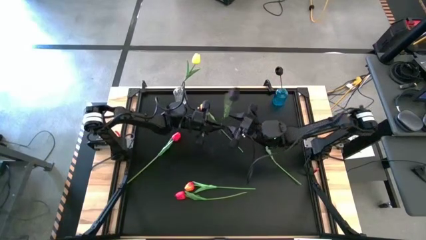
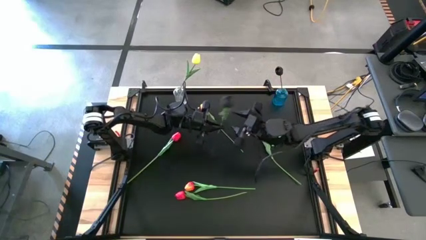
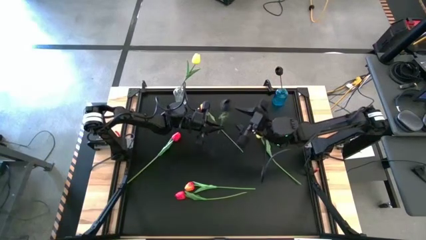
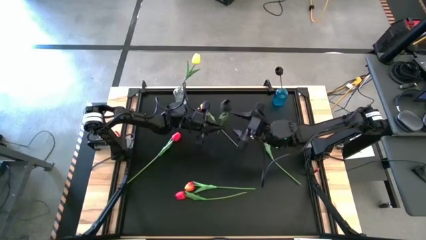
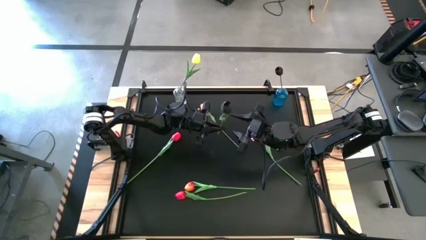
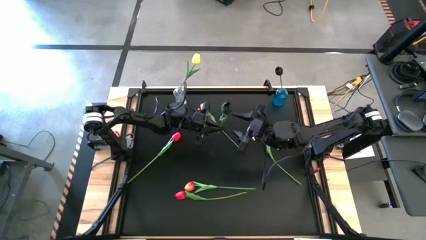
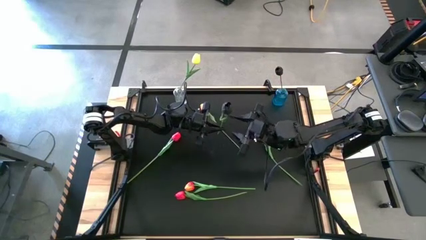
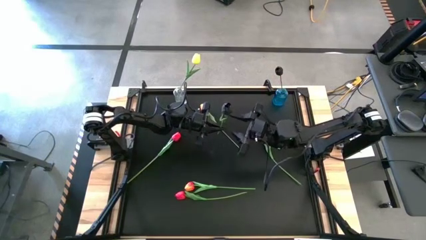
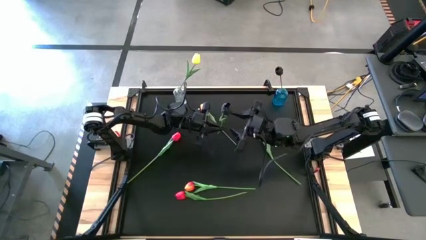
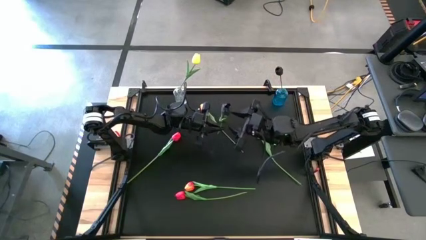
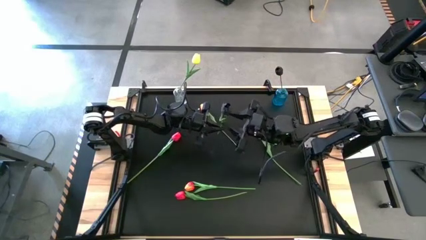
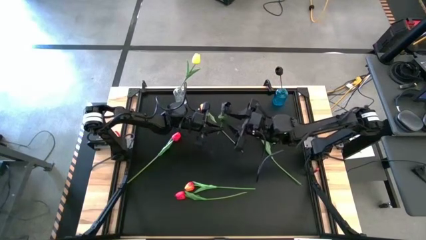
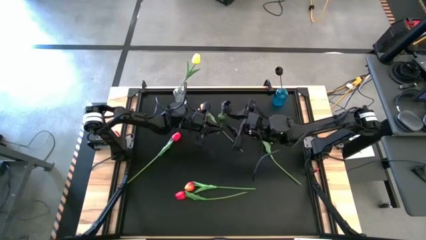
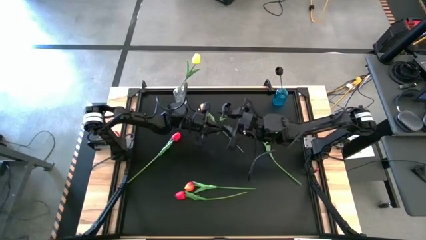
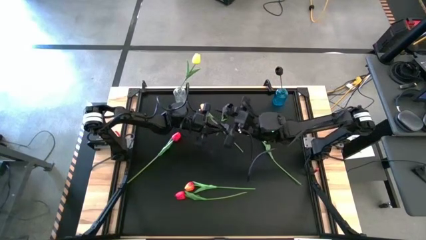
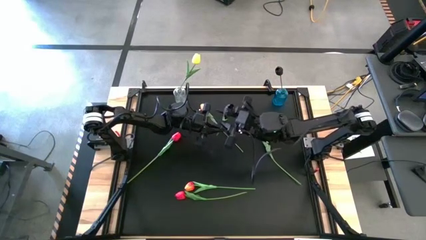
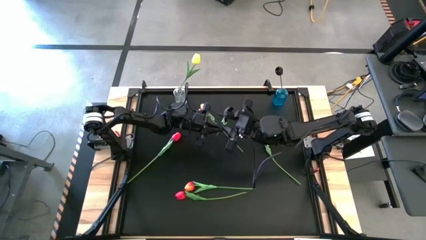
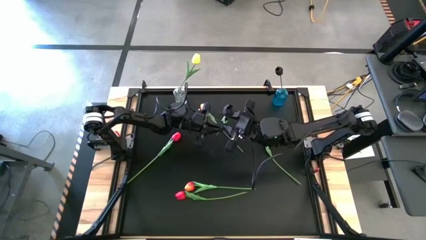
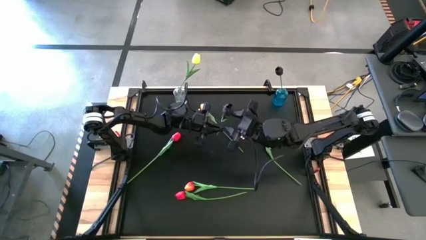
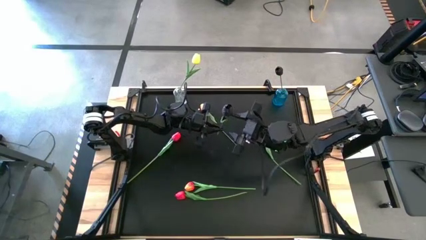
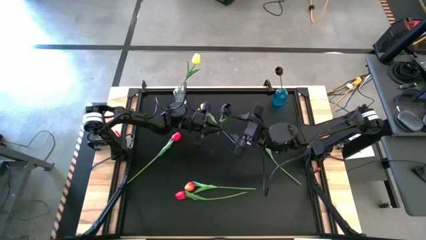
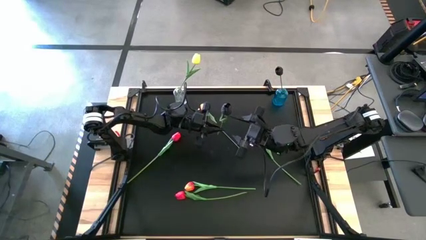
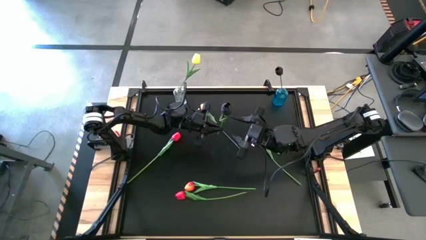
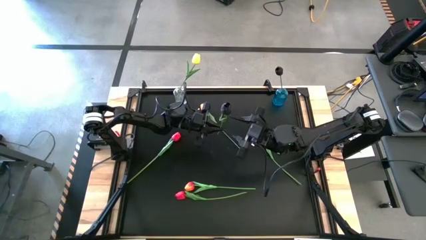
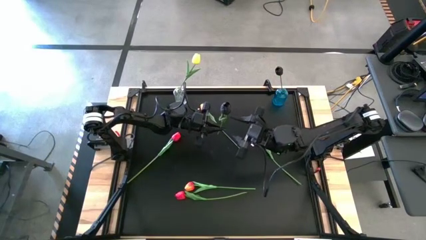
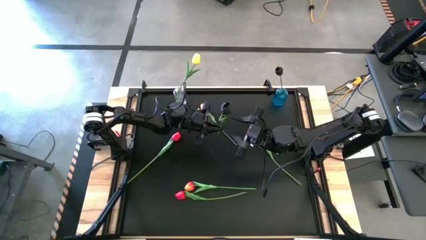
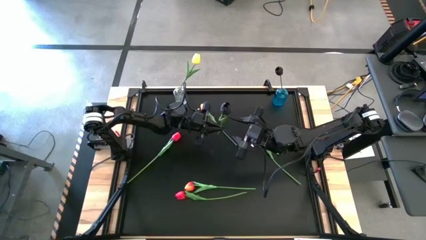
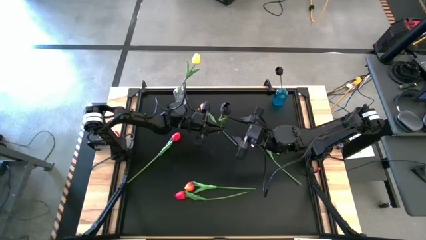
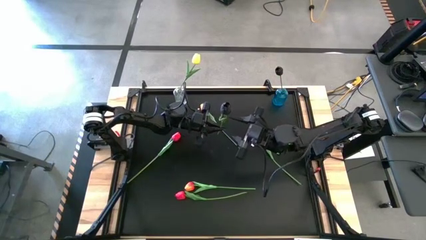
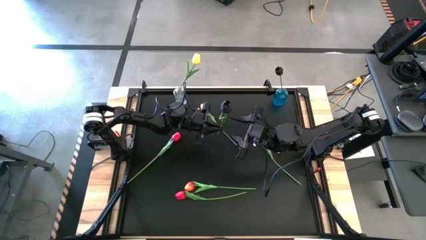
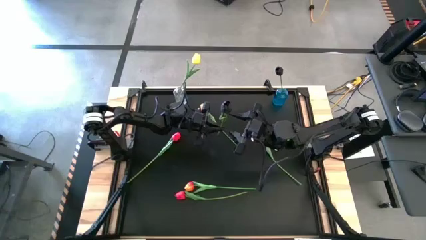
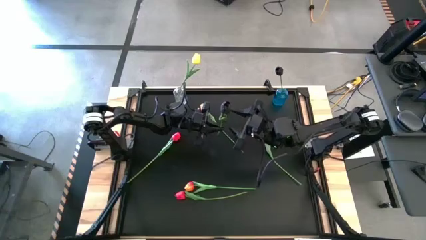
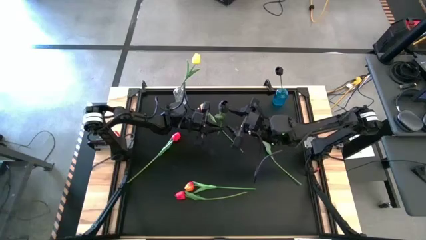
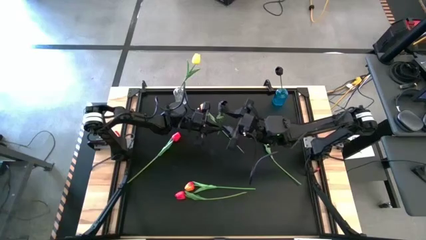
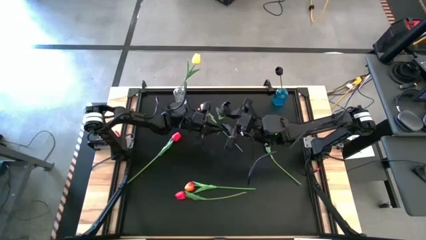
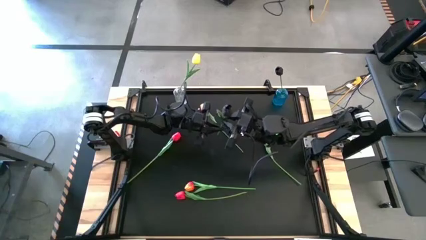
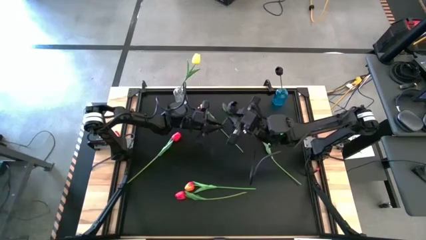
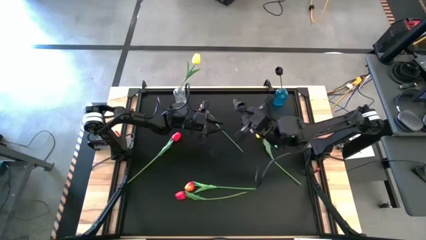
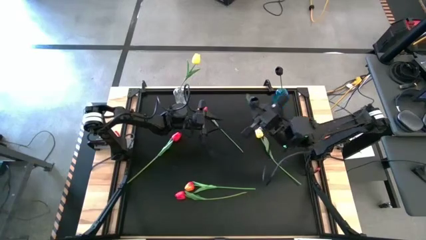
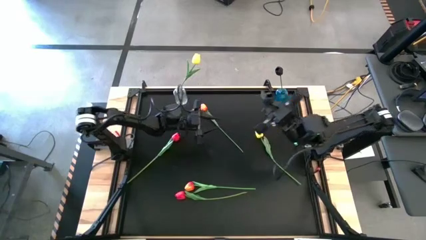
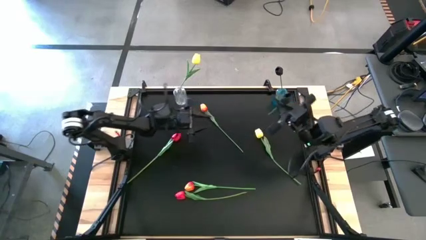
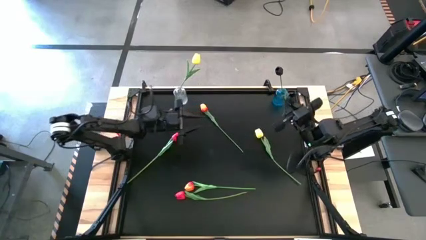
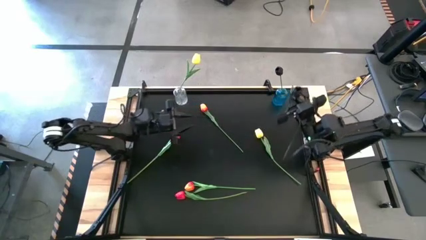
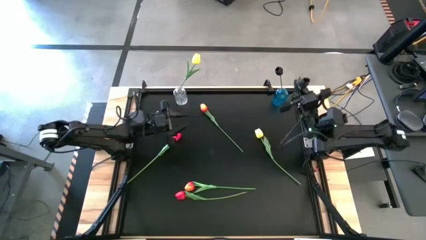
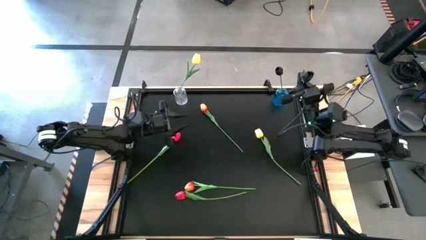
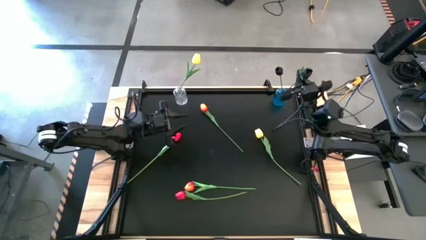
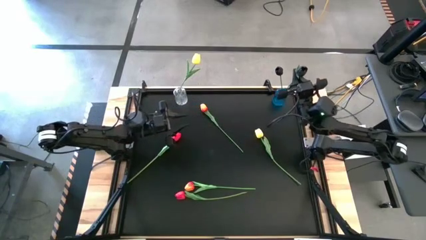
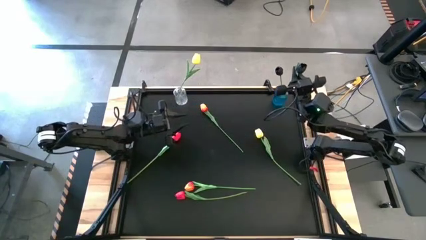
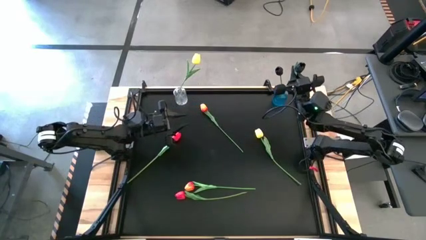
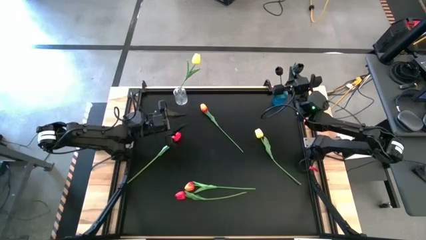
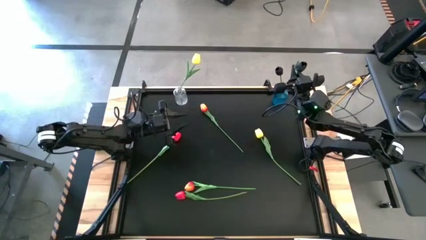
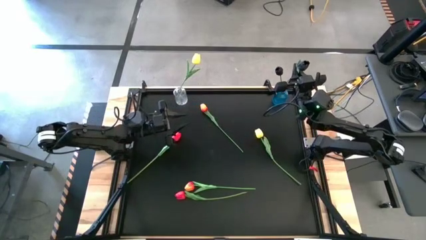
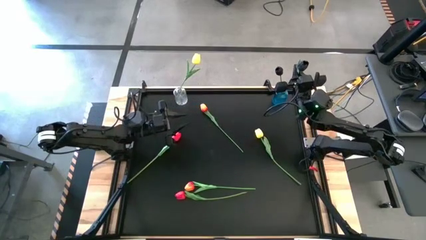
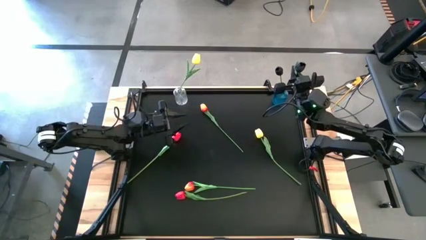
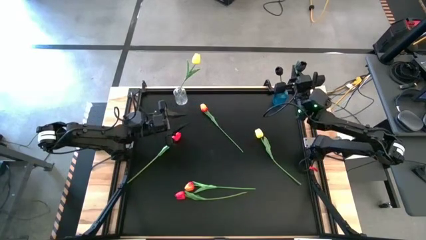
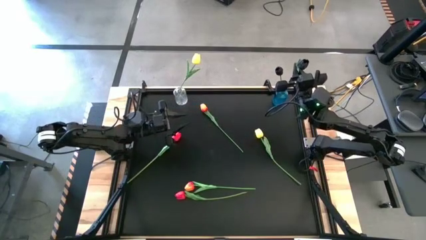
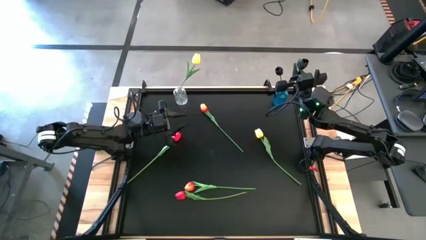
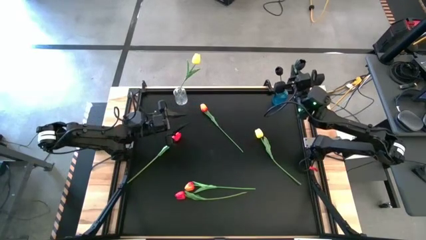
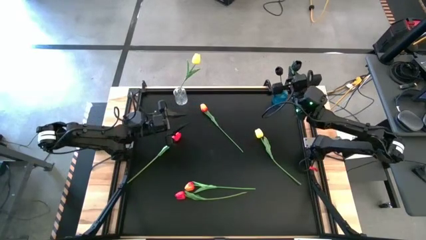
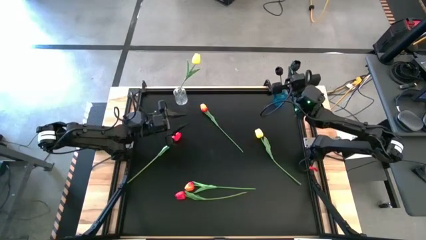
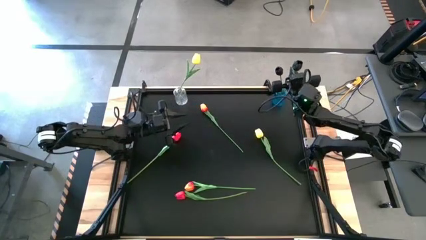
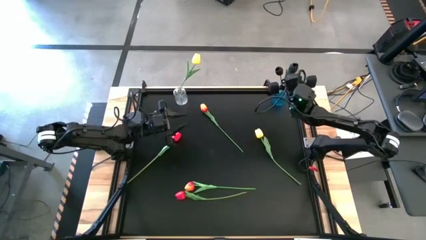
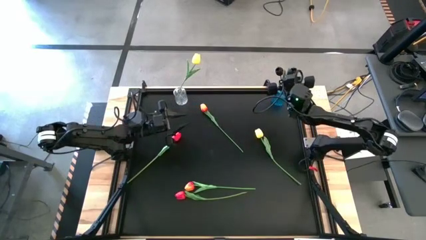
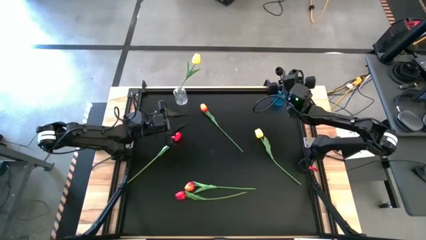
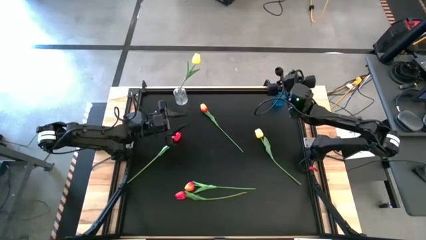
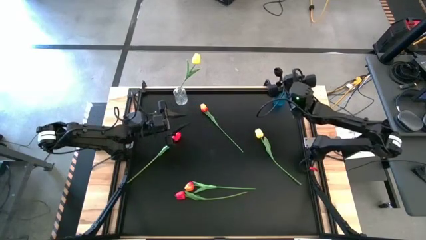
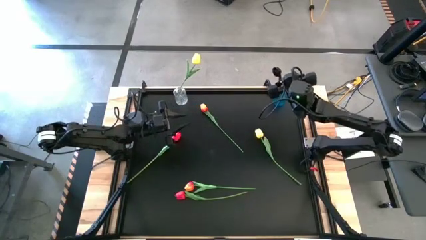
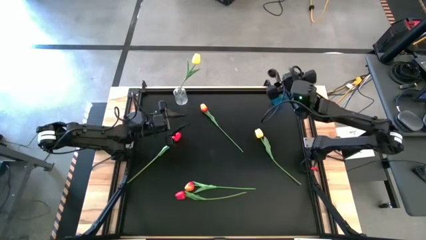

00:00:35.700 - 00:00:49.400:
Task: Sort flowers into vase by color
Put the black flower into the blue vase

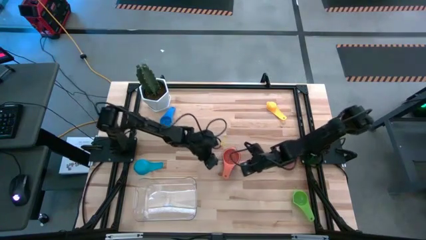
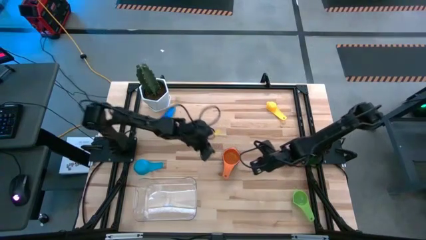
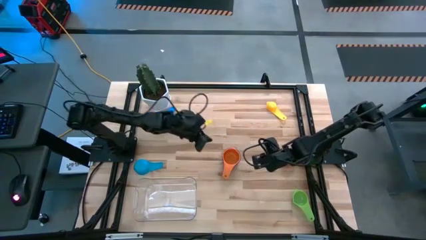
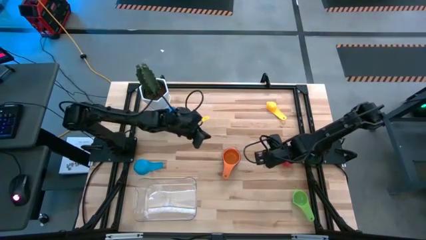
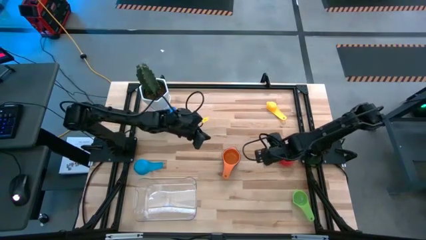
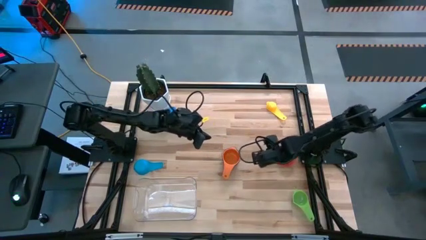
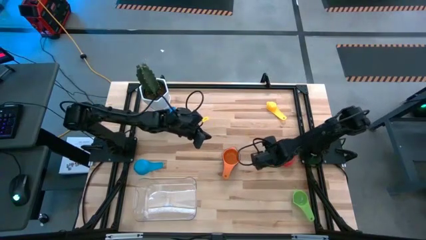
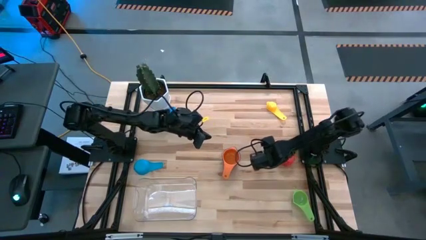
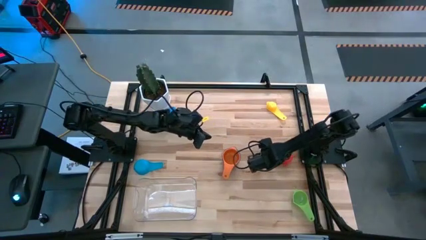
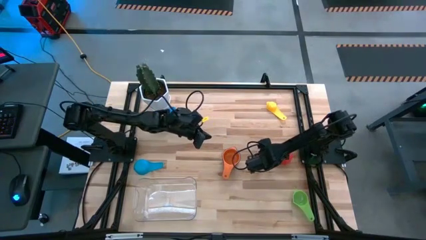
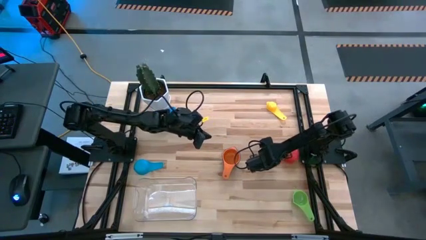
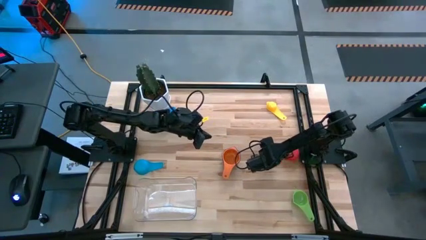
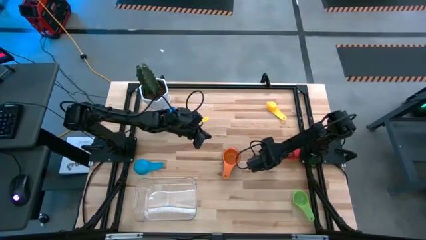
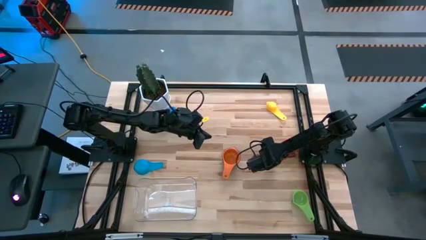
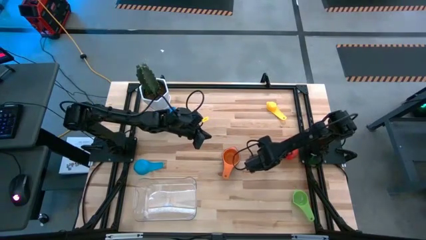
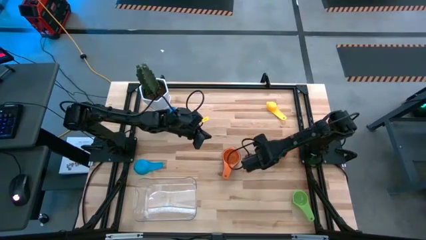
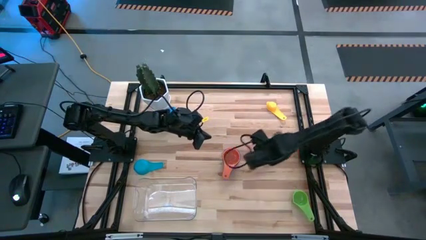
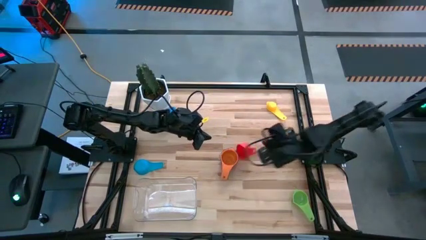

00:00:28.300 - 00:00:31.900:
Task: Nest measuring cups in basket
Stack the red measuring cup on top of the orange measuring cup
